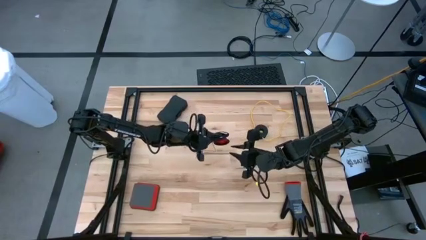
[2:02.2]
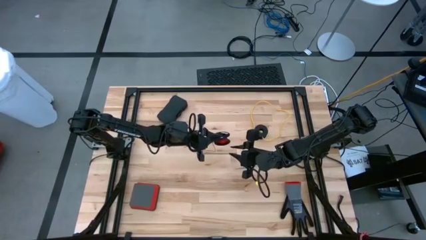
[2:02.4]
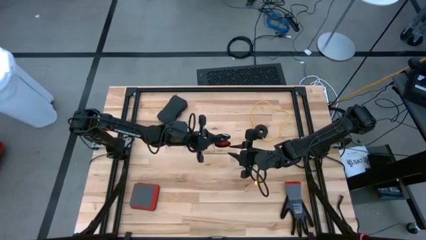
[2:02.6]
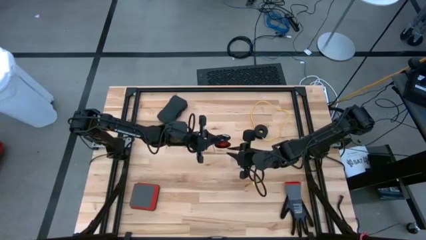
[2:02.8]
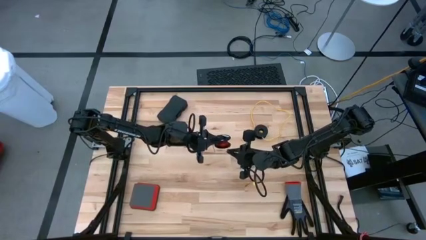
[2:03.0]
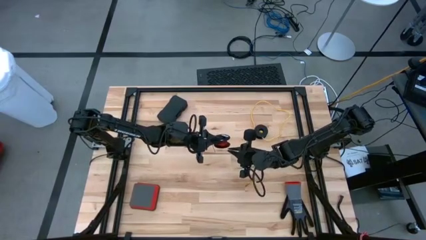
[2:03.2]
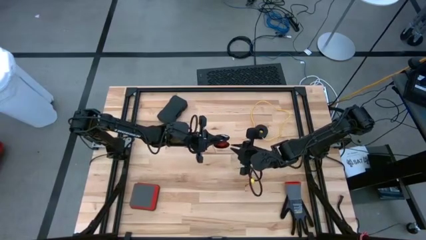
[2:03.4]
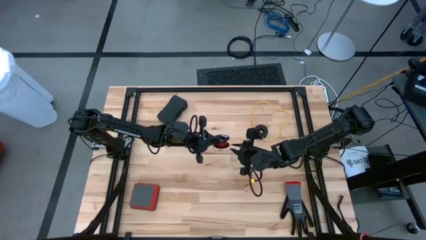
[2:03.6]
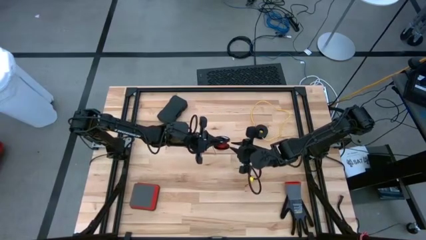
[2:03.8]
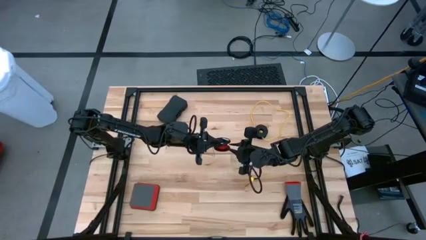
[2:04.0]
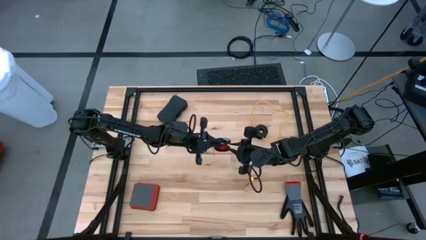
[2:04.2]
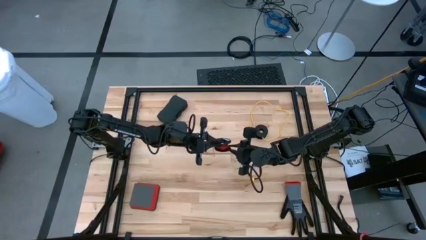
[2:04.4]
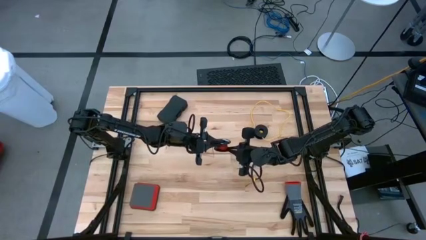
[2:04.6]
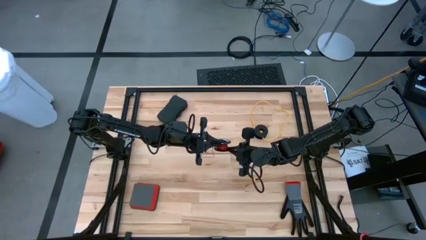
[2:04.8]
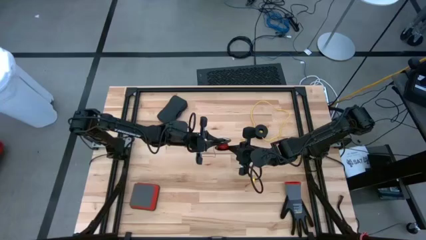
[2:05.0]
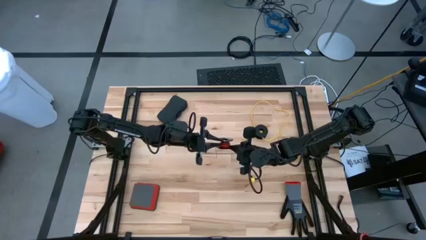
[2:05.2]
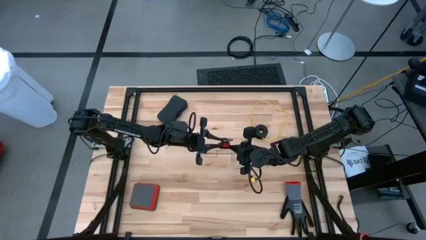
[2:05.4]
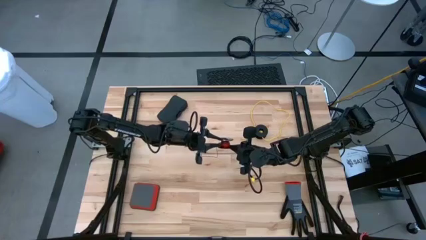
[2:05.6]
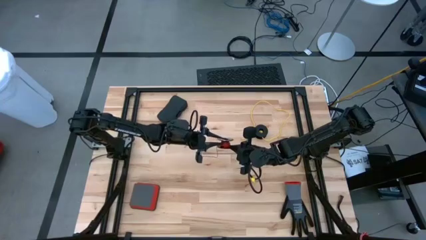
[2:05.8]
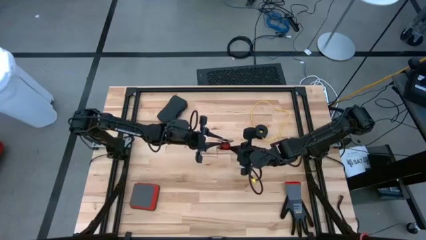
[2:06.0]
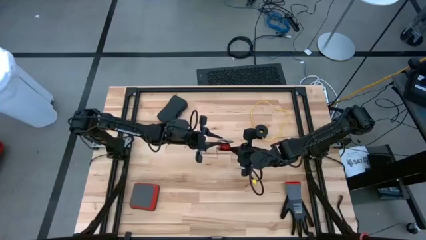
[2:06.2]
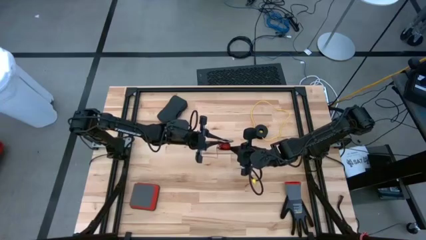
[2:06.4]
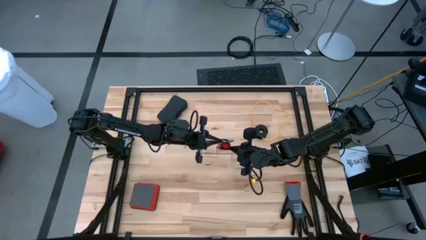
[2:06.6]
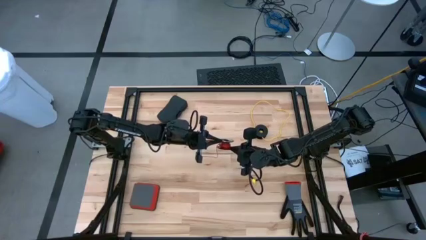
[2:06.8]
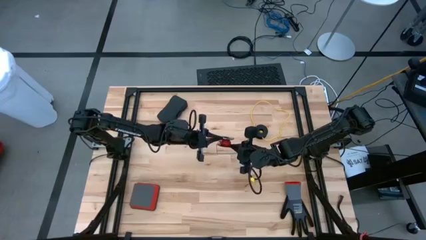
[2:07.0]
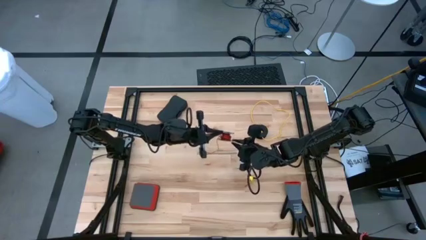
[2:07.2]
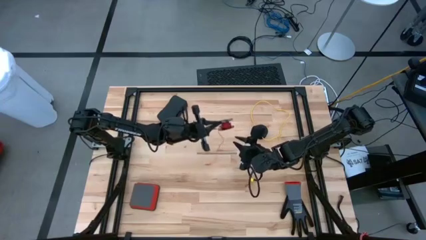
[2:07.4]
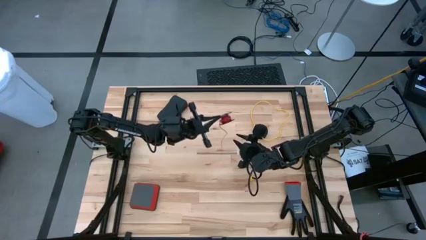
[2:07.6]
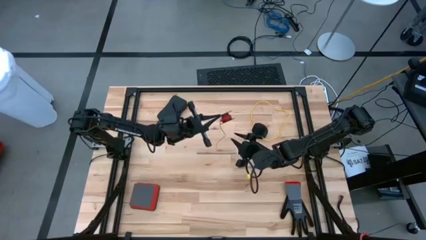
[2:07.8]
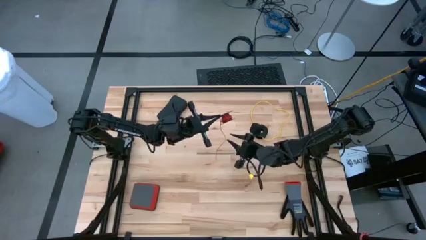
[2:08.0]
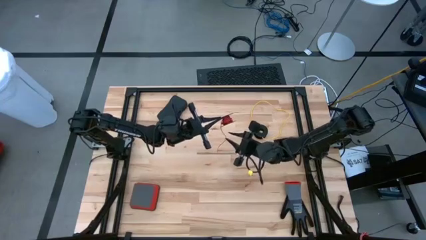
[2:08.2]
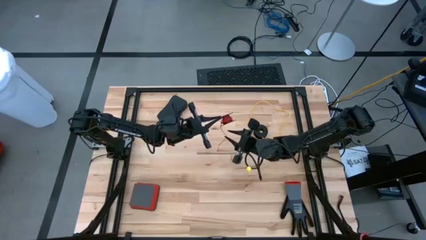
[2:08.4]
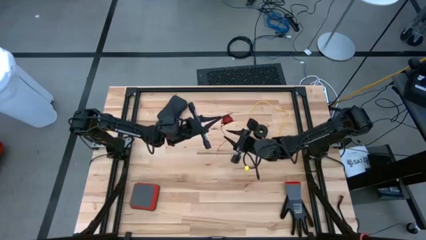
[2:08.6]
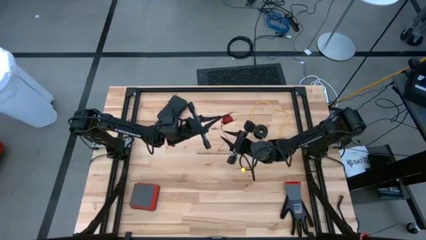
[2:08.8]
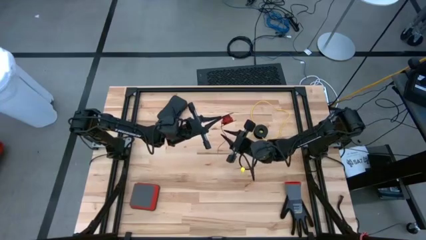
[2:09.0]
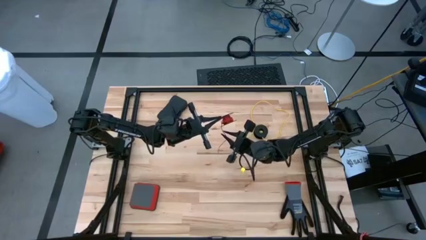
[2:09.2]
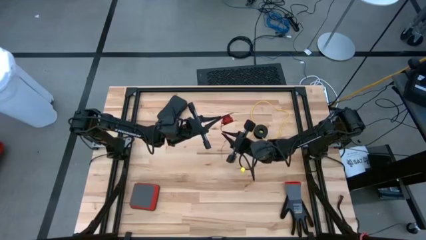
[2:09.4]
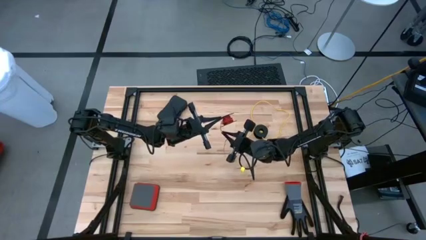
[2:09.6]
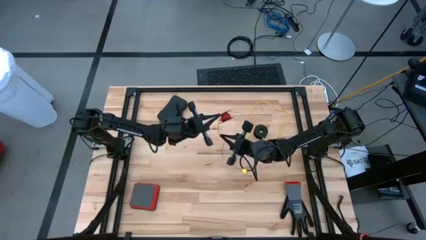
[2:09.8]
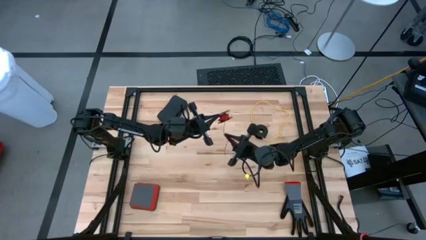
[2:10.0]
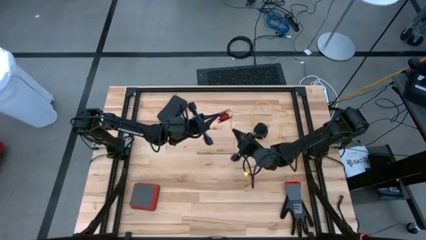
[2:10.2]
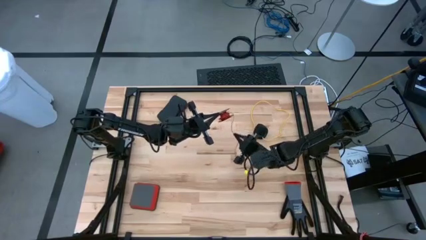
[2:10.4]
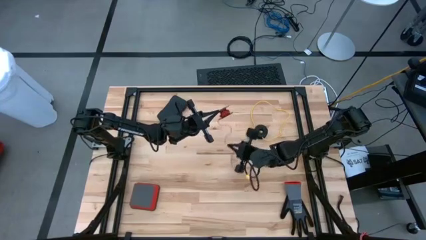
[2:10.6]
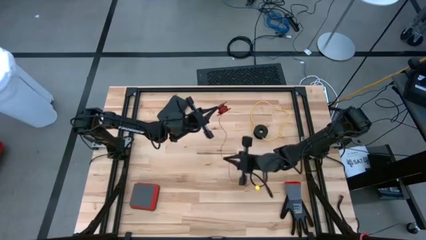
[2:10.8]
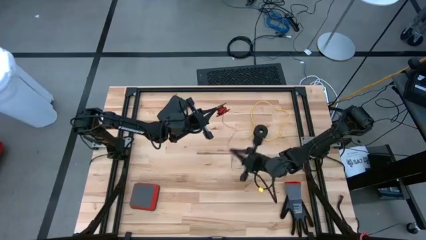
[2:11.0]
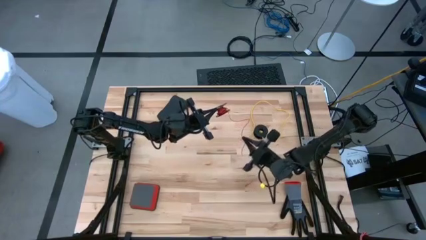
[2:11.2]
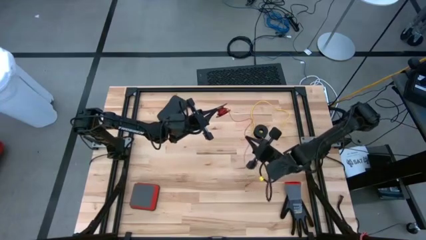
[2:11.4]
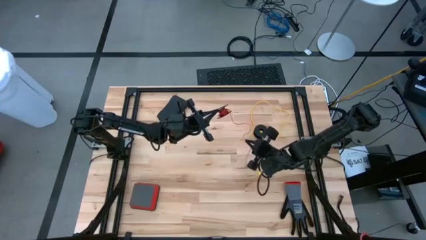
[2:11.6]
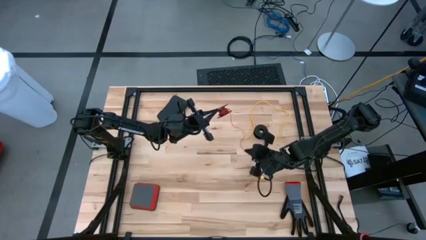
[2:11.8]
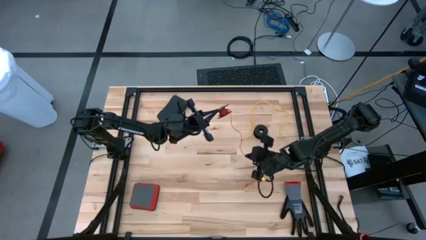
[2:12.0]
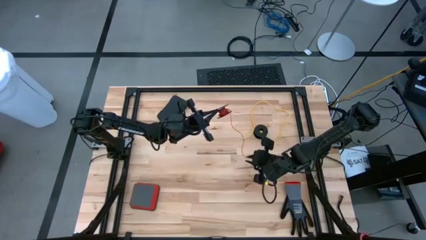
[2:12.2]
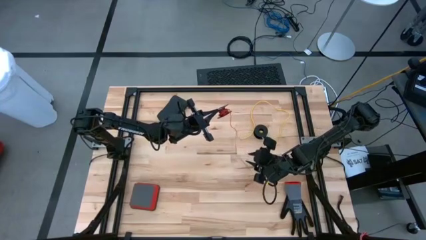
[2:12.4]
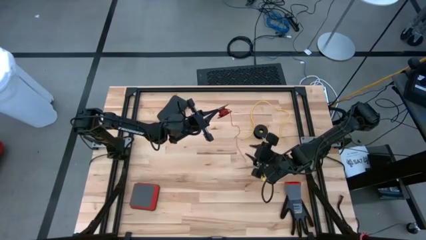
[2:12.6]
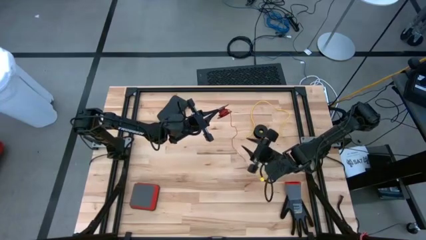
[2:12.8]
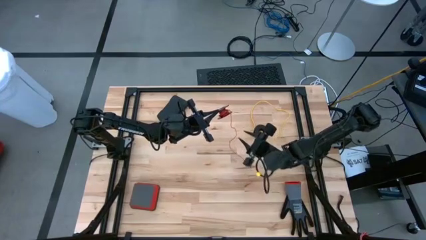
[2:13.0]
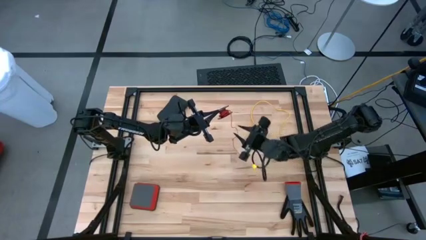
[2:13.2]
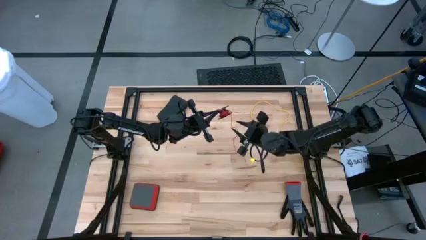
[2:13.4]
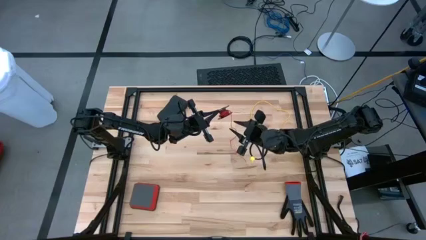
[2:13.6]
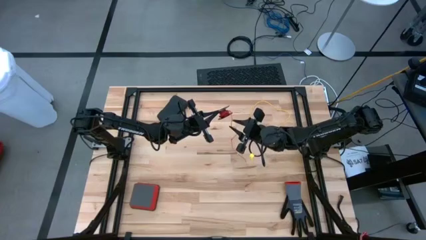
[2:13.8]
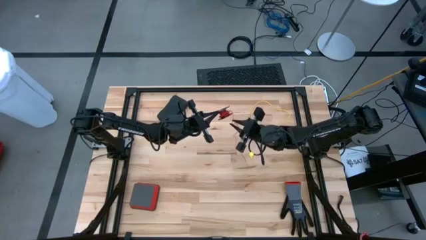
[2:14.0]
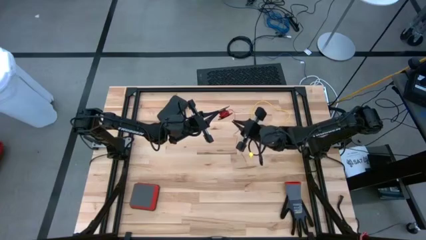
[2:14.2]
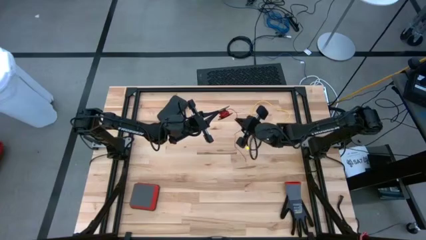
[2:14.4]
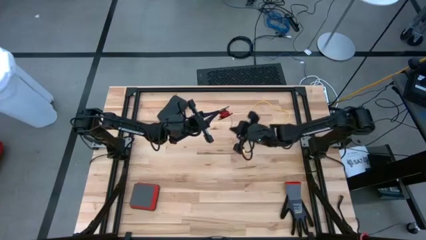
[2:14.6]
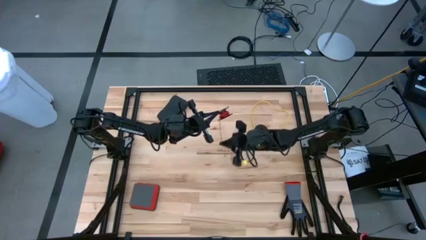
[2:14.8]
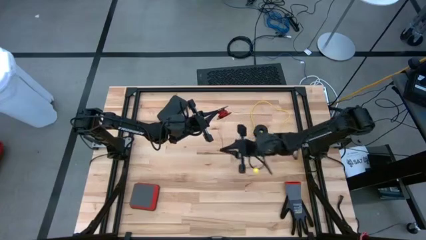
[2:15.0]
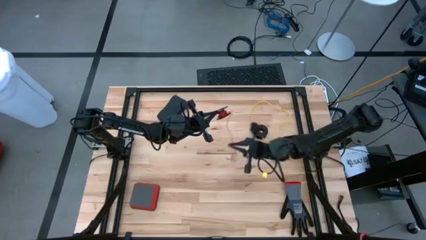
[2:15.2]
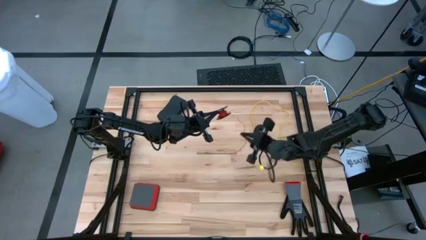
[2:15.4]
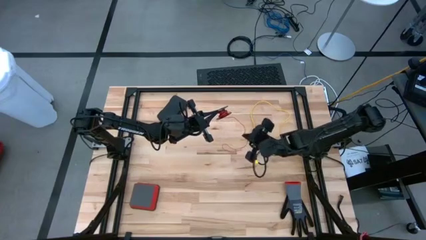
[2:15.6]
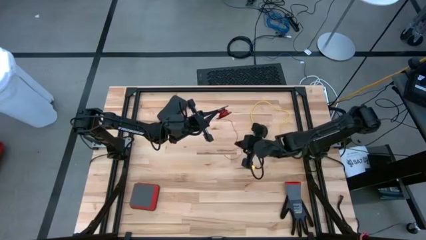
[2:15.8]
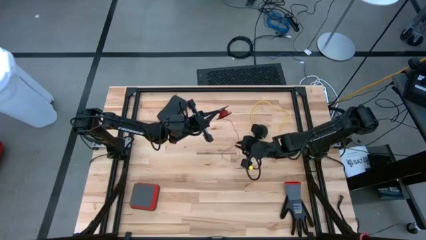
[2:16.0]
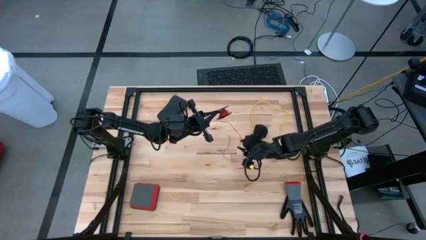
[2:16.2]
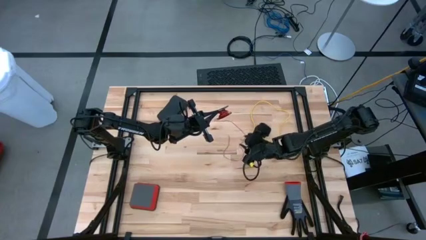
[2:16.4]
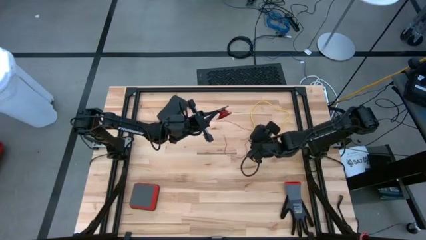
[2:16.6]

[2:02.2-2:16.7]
Task: Coil cords
Uncoil the red wire from the black spool
